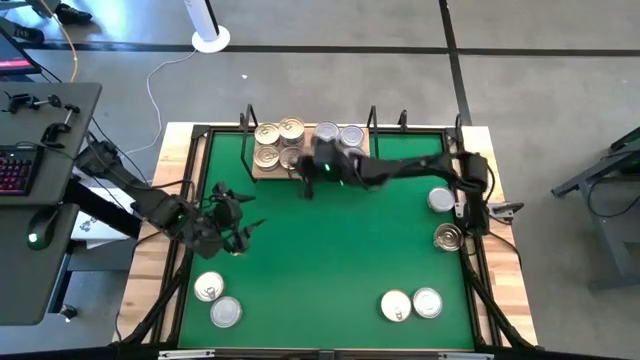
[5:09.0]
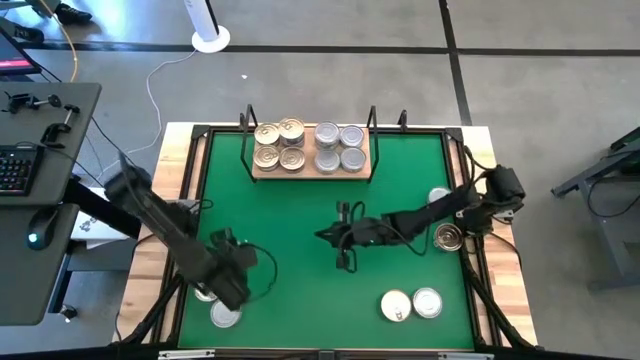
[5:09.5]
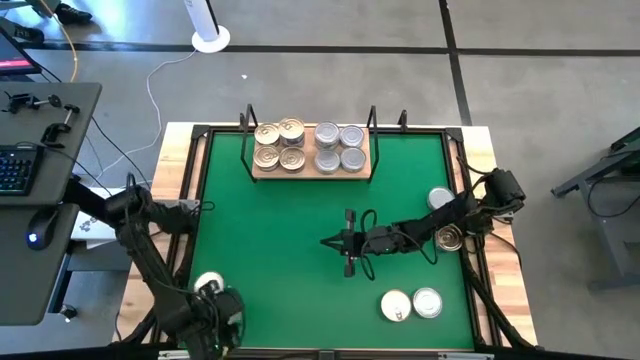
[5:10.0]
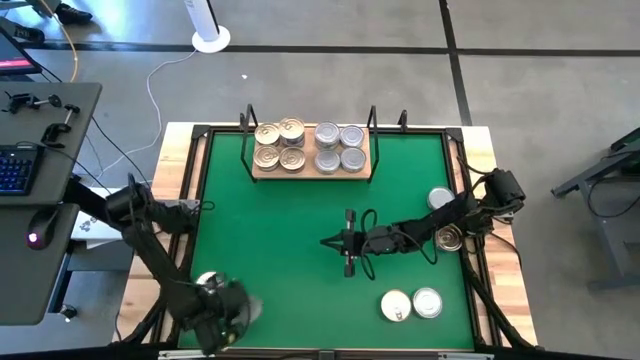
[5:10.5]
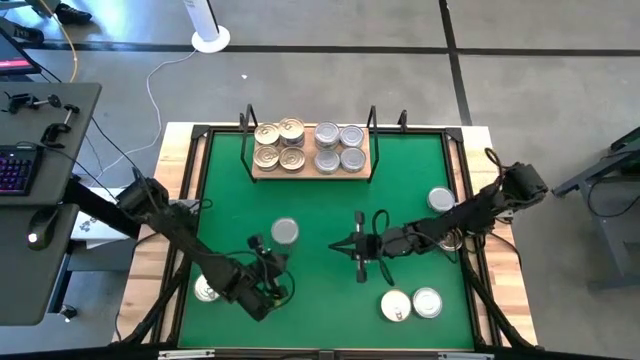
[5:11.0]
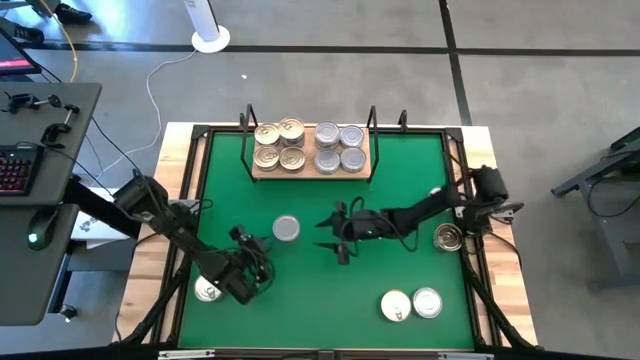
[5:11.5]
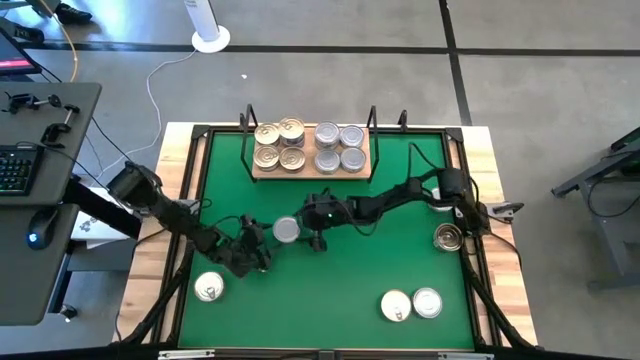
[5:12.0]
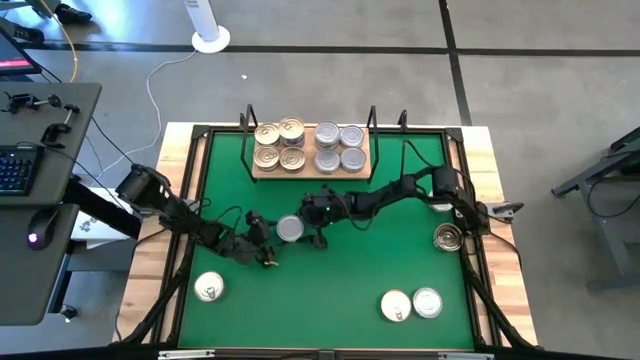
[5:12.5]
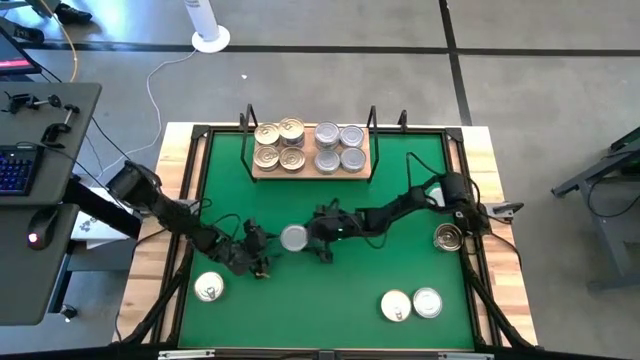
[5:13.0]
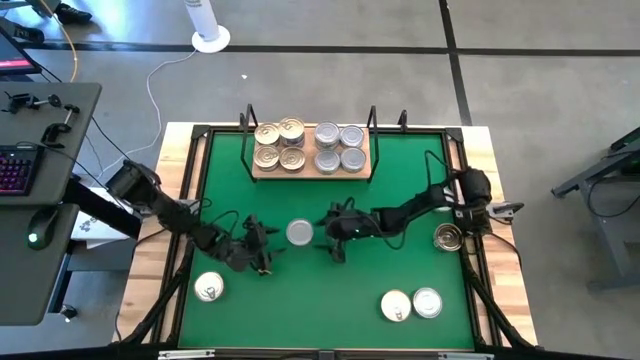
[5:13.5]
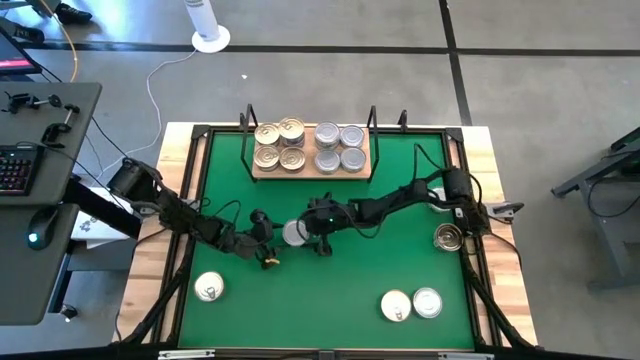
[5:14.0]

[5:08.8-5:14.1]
Task: Stack canned seafood by type on shelf
Stack the green tuna can on top of the other green tuna can on the shelf

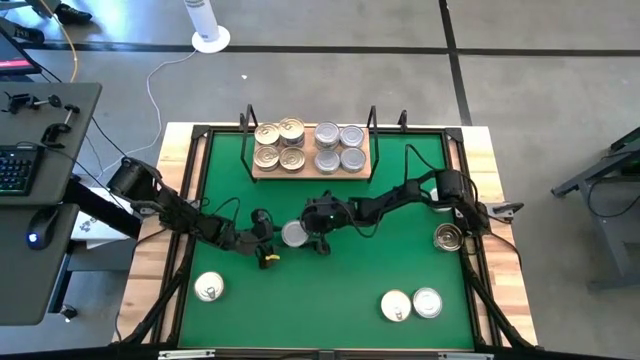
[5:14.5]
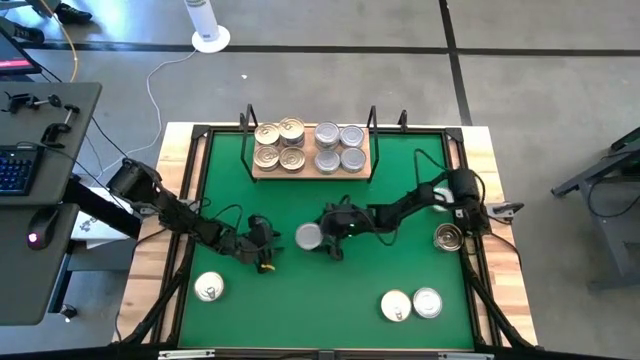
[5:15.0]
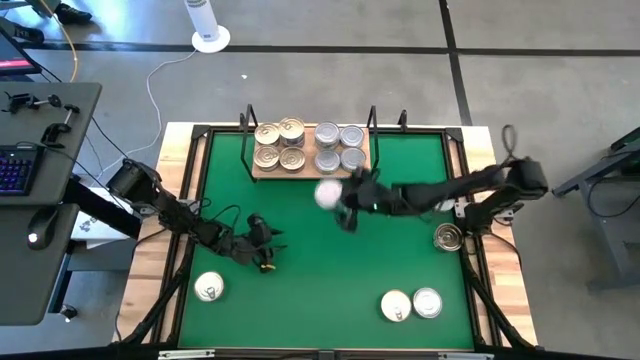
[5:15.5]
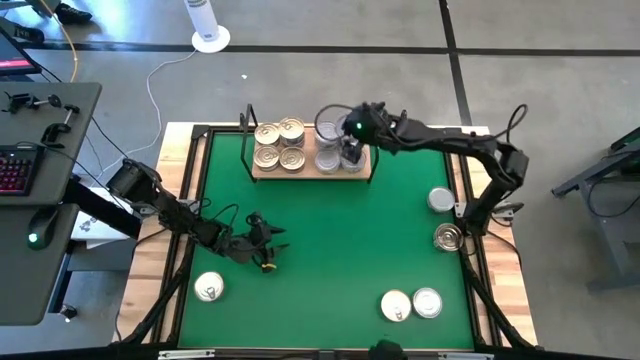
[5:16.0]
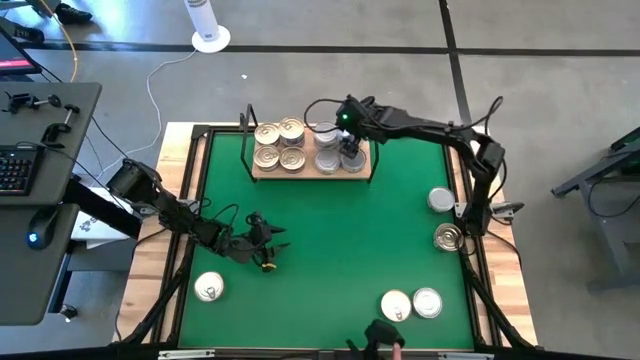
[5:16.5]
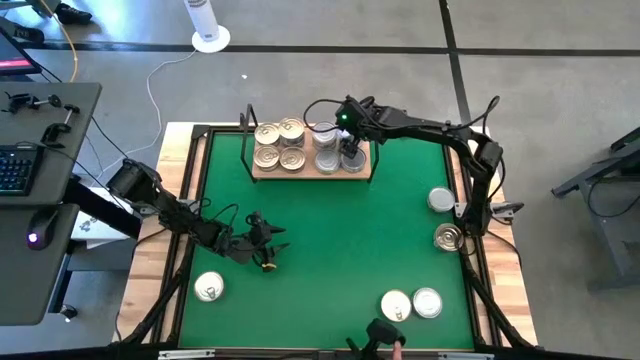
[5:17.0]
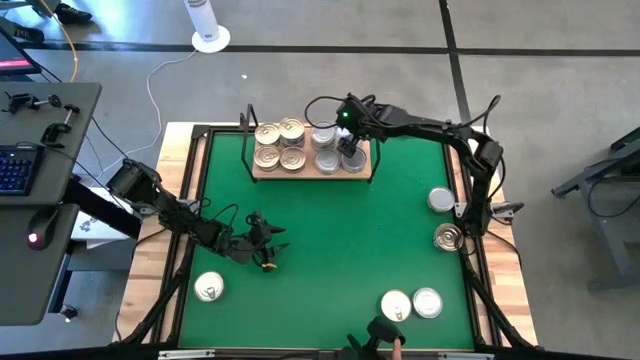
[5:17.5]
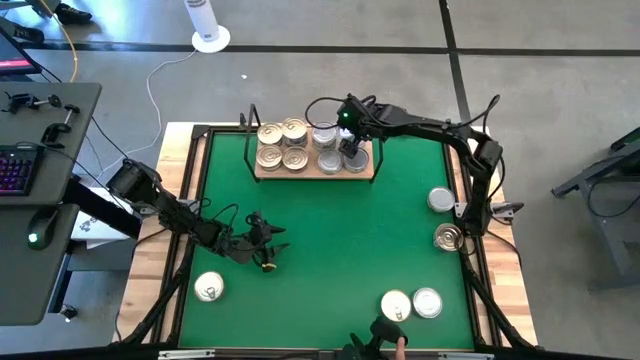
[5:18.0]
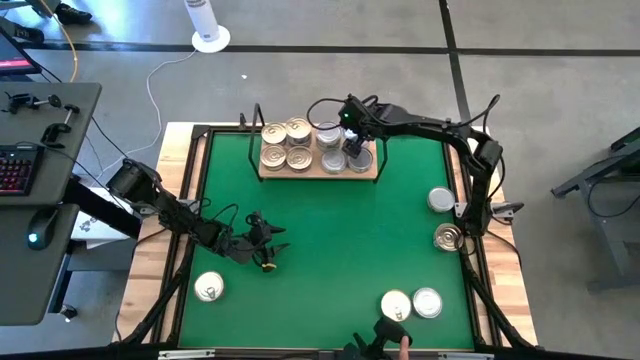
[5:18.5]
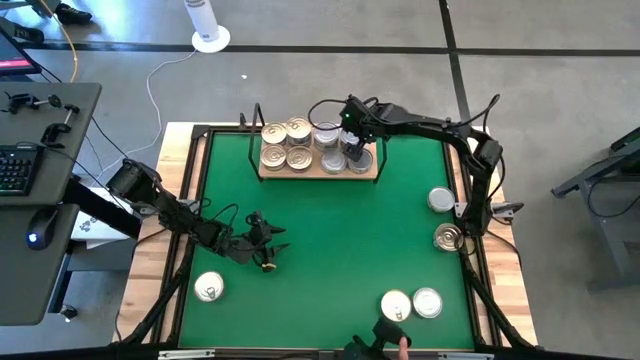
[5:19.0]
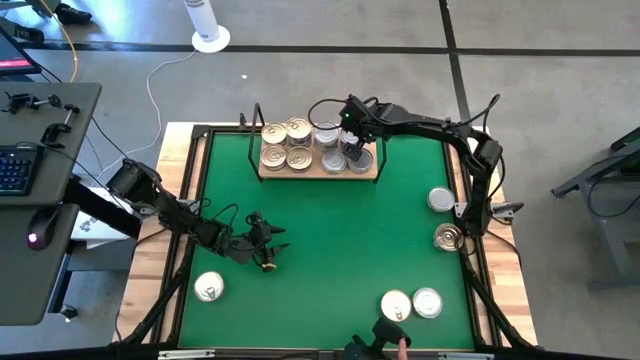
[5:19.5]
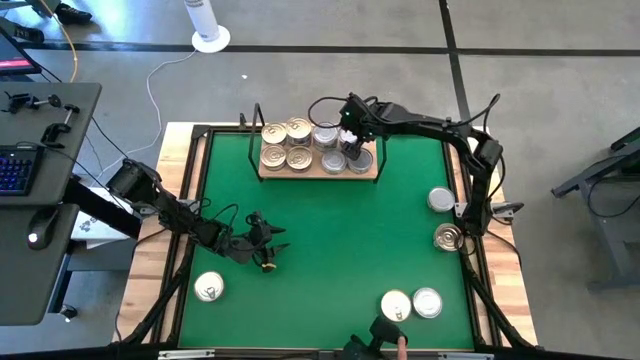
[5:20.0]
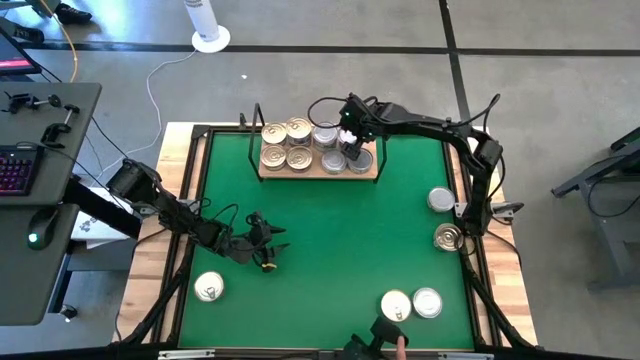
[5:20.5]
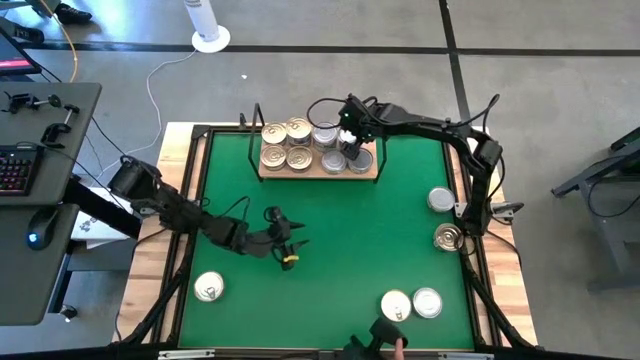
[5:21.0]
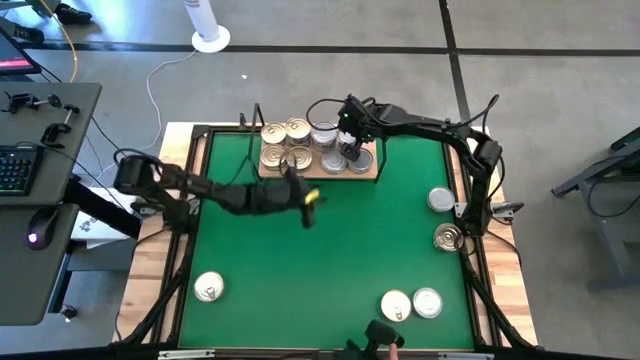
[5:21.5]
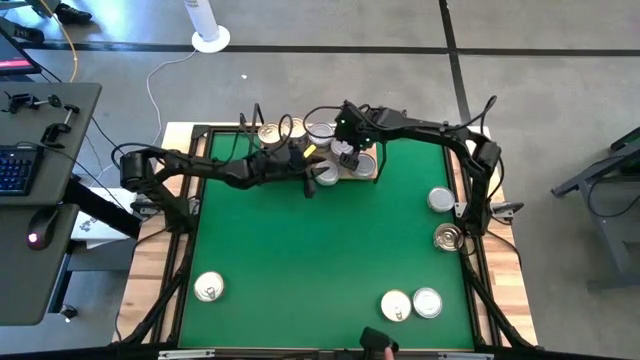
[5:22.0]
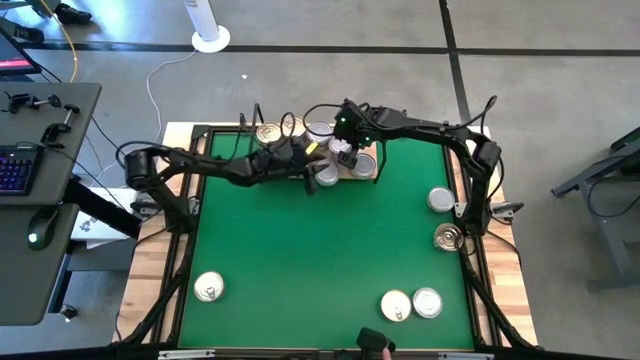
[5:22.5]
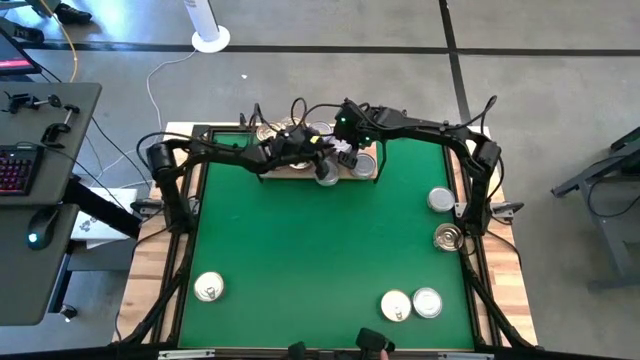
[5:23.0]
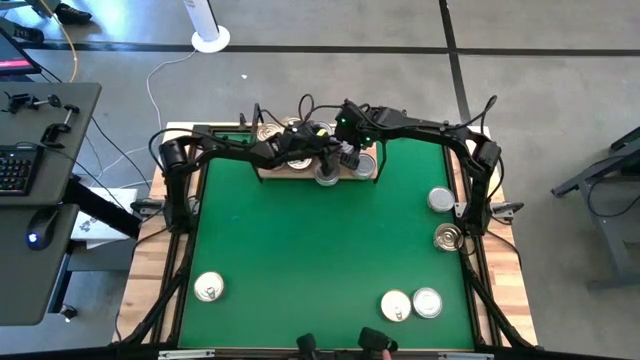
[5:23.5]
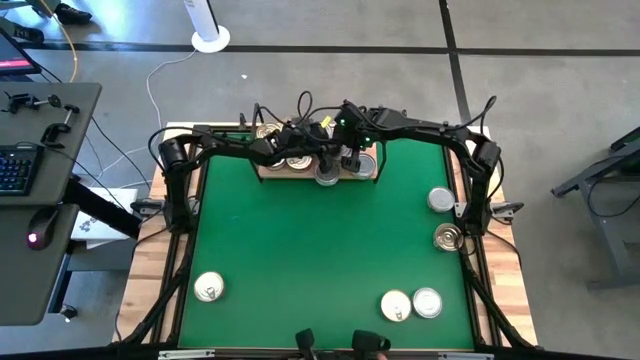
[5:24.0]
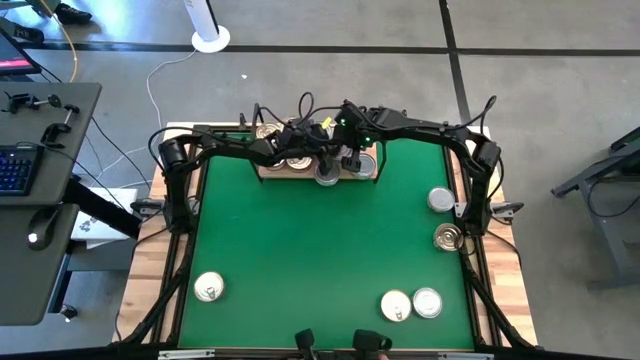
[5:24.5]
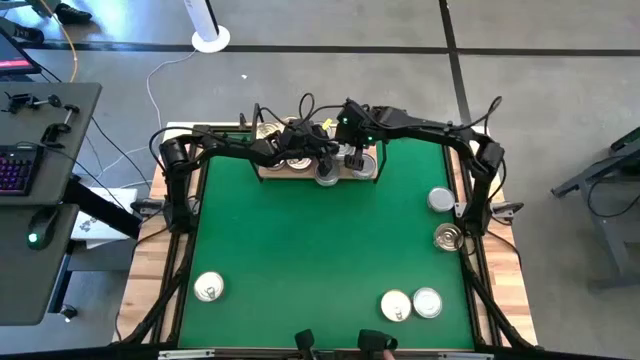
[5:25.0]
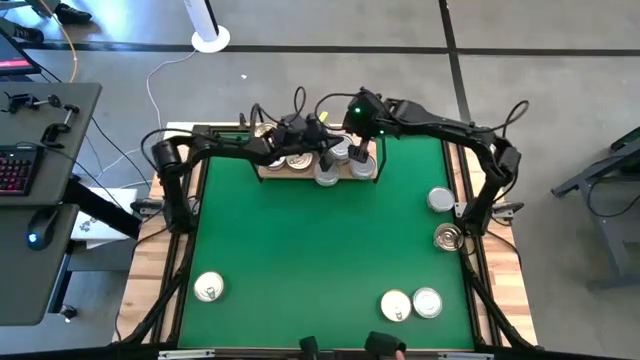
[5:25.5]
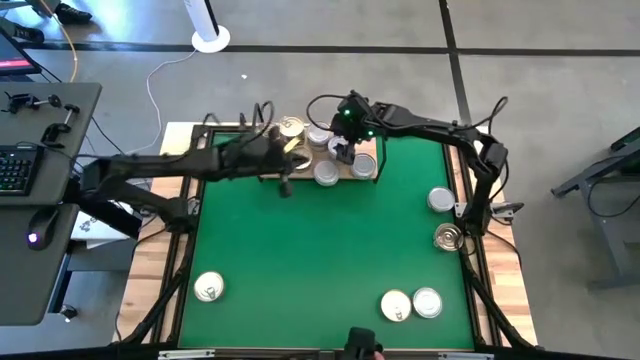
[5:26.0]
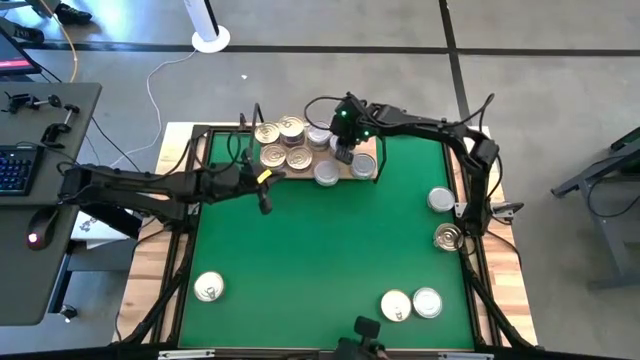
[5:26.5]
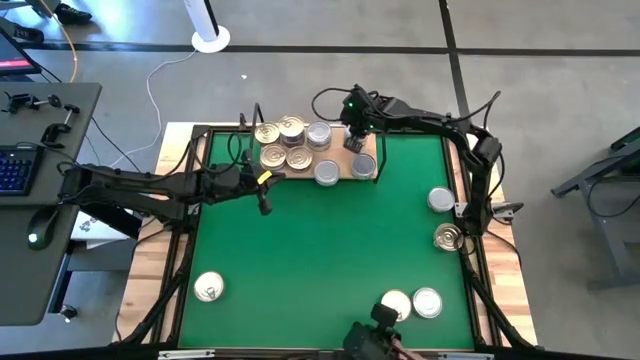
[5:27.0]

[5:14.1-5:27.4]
Stack the green tuna can on top of the other green tuna can on the shelf

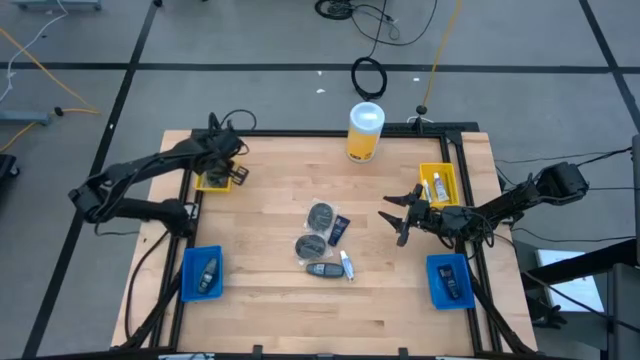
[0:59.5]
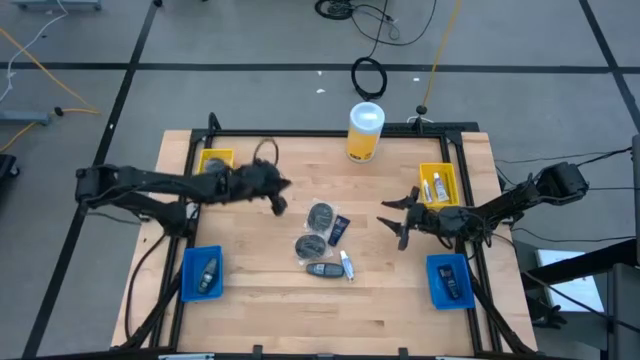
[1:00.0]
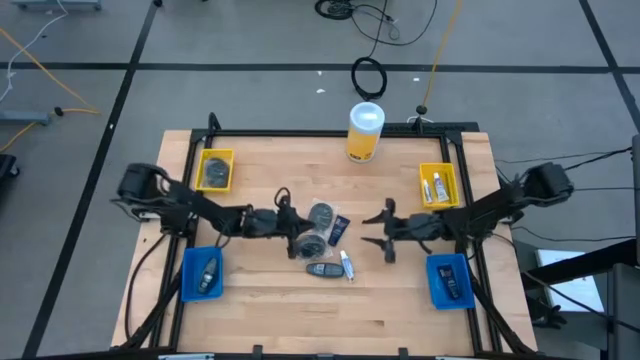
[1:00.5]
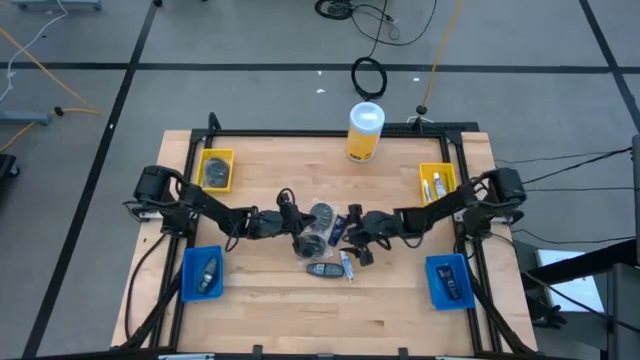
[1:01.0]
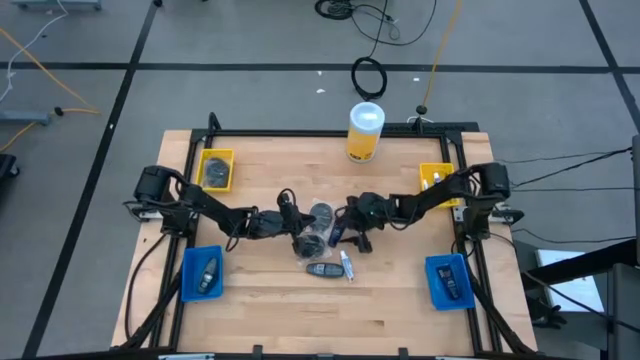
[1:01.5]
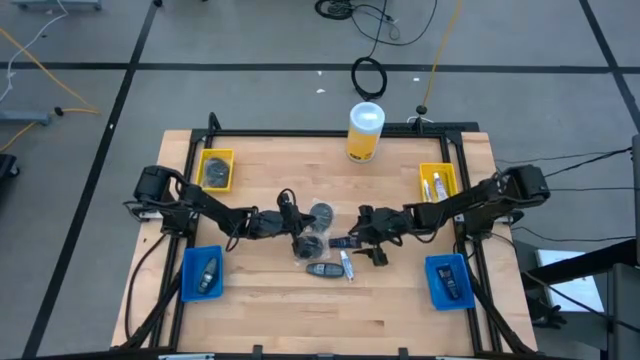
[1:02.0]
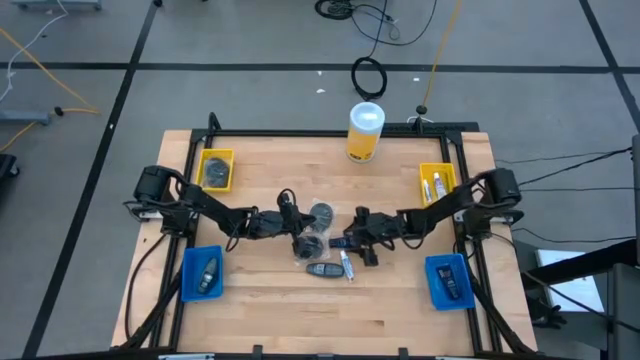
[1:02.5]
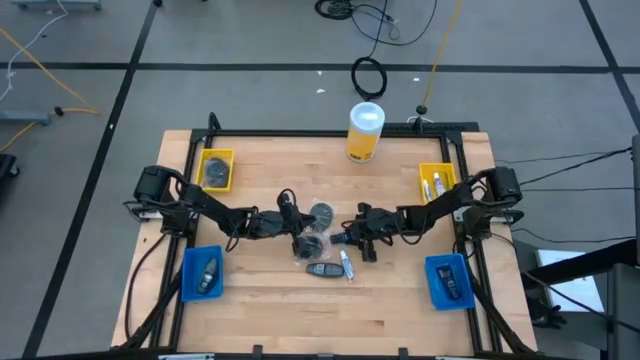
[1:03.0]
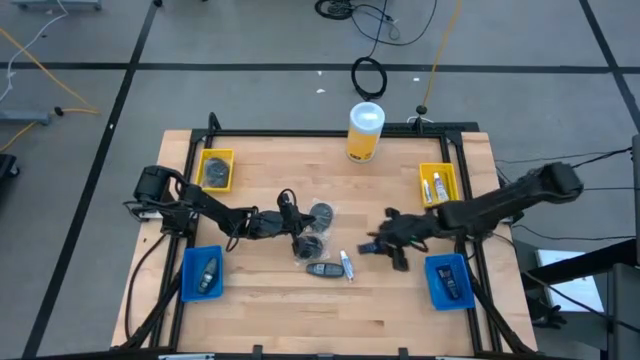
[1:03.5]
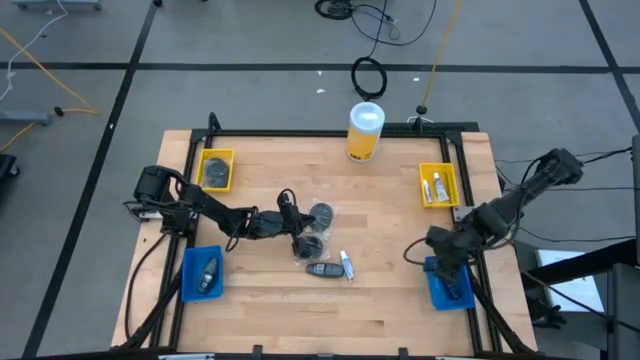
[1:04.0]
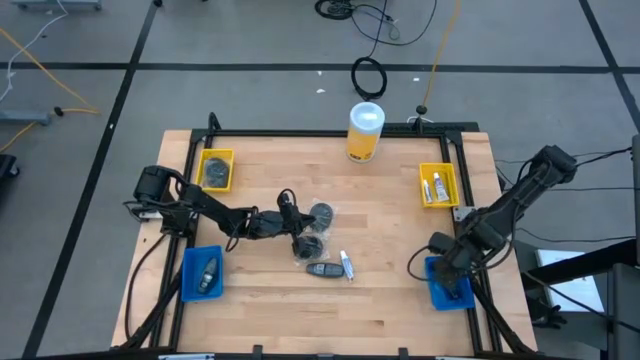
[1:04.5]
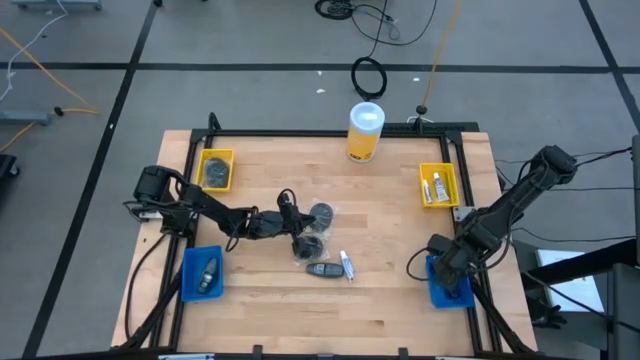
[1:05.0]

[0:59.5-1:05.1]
Task: Pick & Place Travel size toiletries
Put the blue shaving cream into the right blue bin
